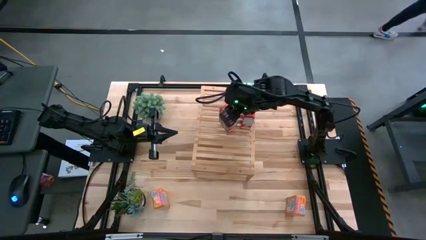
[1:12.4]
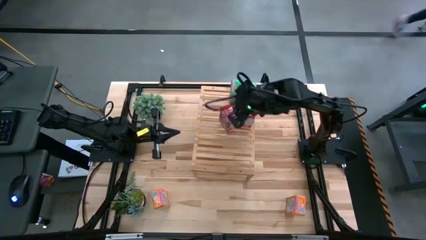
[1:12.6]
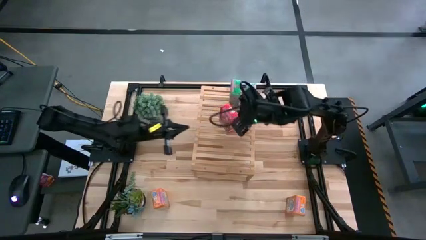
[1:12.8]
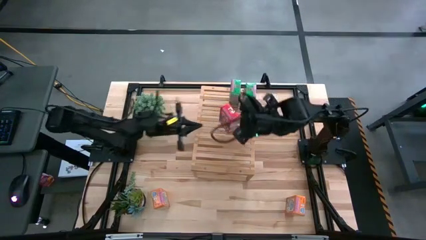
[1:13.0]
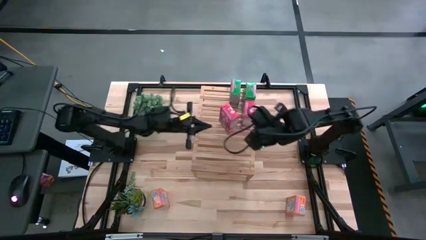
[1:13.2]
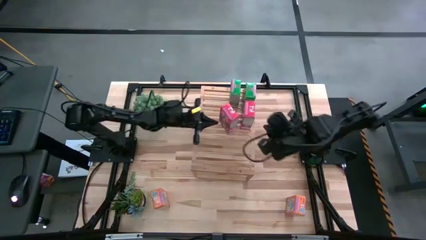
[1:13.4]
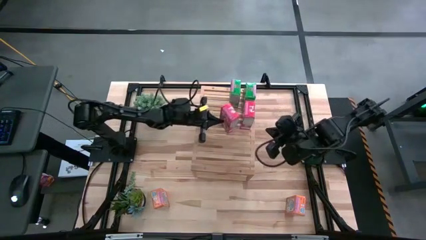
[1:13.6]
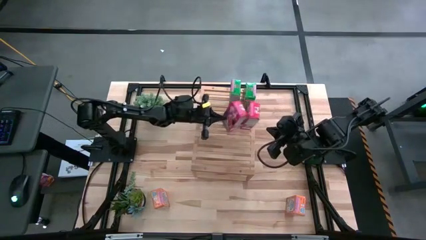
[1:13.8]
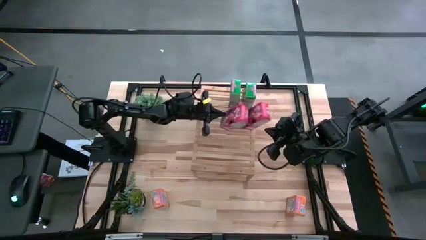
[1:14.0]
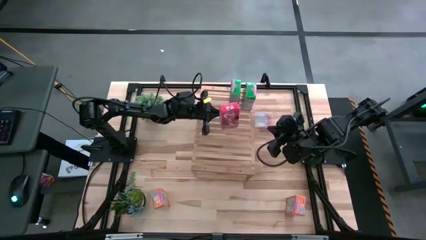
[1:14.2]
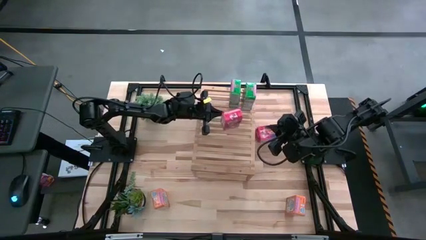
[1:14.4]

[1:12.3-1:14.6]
Task: Stack cereal on shelf
Adjust the red cereal box

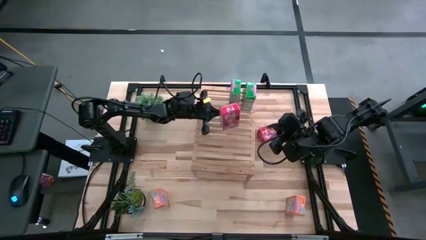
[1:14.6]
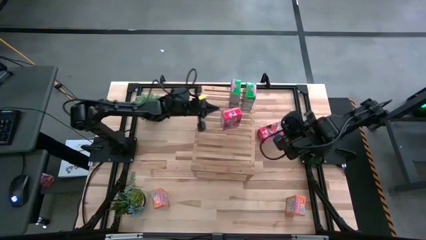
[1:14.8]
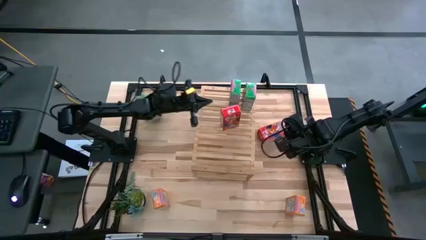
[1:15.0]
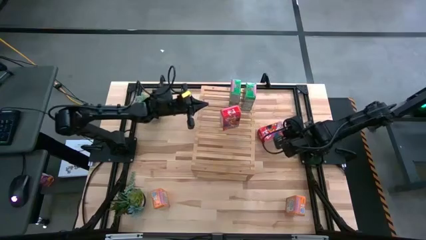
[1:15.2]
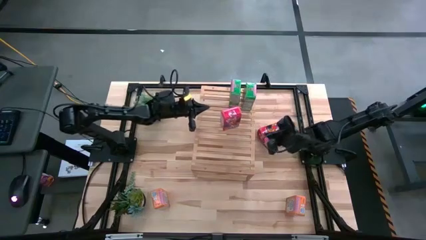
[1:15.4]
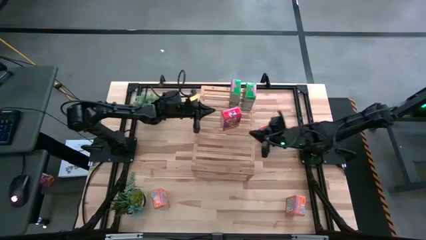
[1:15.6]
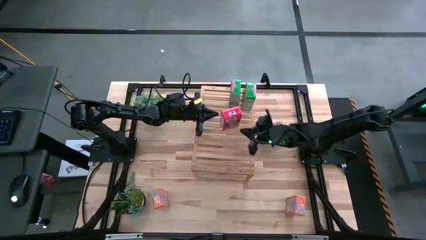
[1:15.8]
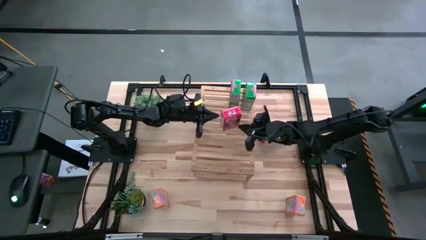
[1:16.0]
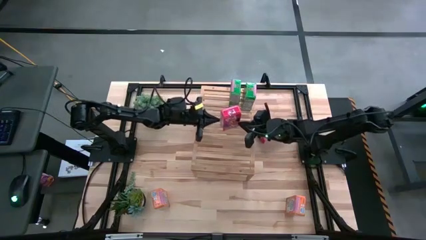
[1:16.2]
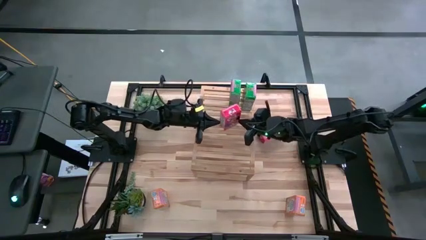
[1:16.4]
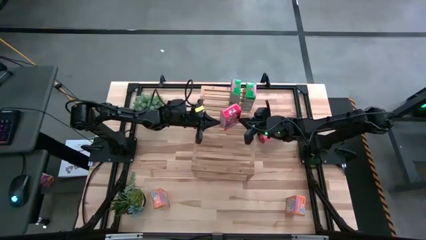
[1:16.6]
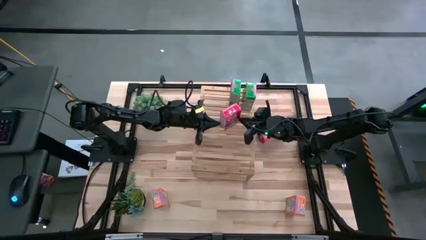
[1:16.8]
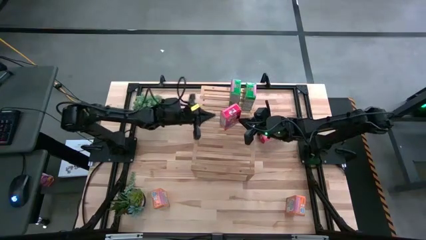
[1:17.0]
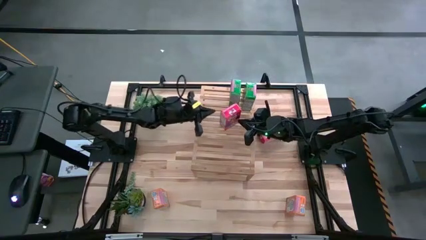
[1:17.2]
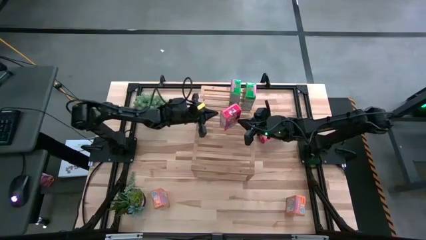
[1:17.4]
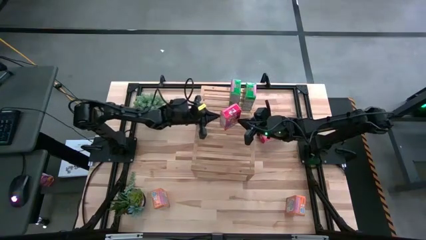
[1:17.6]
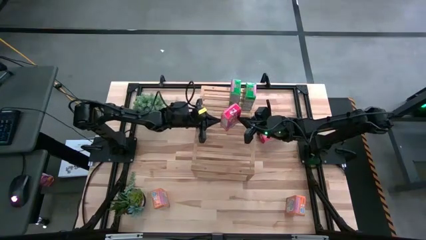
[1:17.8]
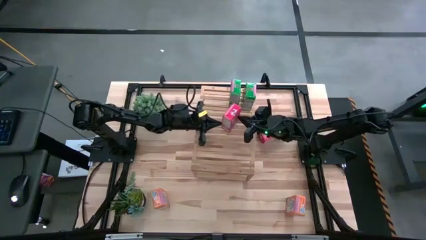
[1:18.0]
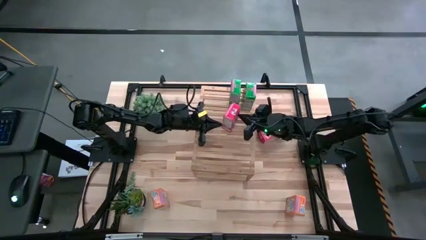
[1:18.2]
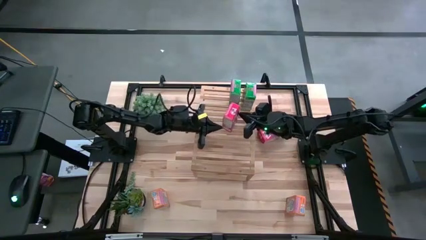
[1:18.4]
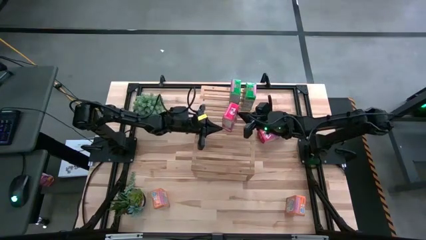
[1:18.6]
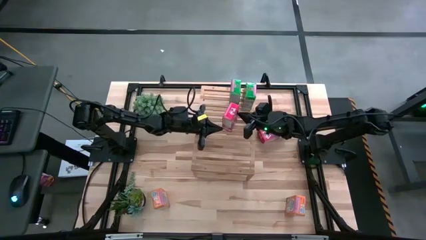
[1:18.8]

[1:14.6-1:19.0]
Adjust the red cereal box

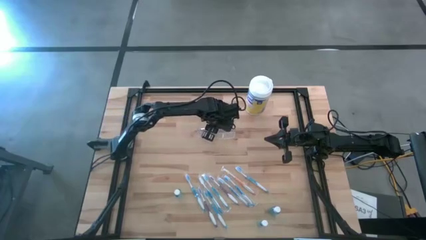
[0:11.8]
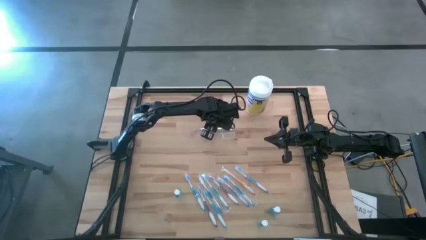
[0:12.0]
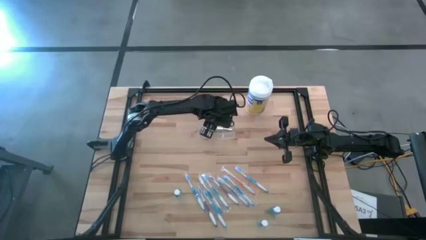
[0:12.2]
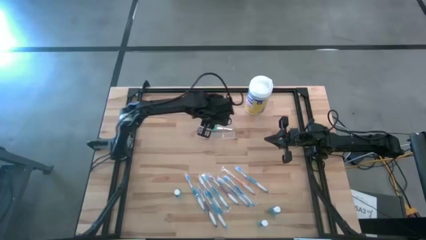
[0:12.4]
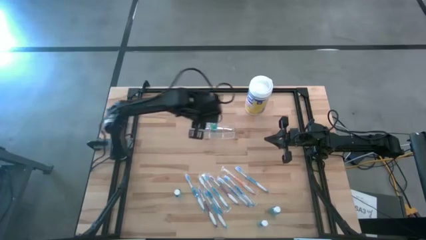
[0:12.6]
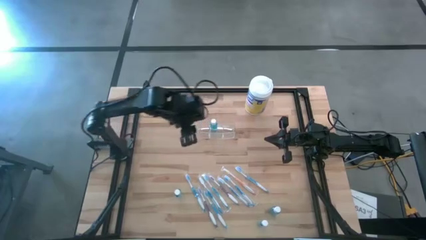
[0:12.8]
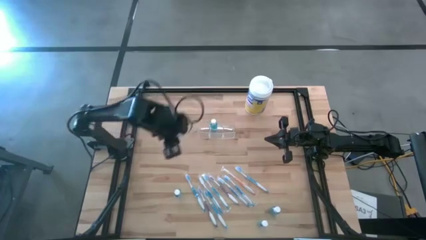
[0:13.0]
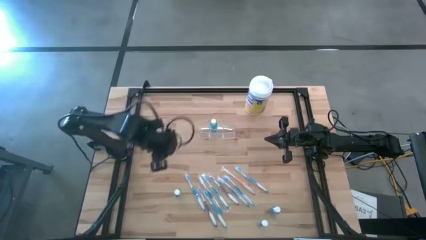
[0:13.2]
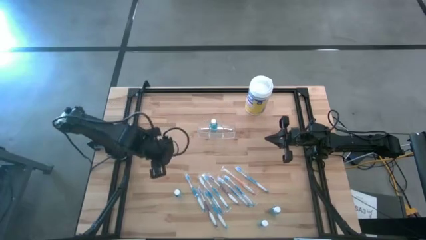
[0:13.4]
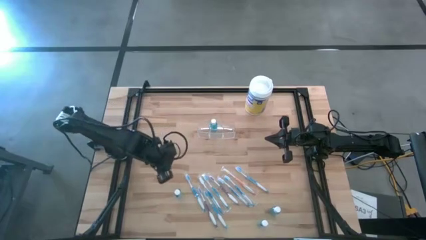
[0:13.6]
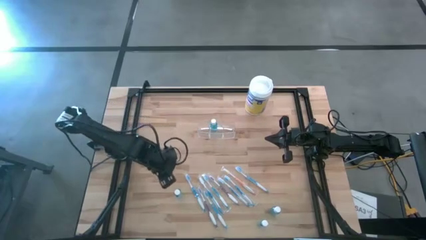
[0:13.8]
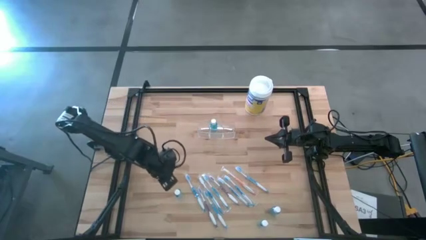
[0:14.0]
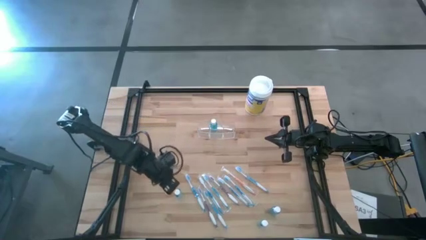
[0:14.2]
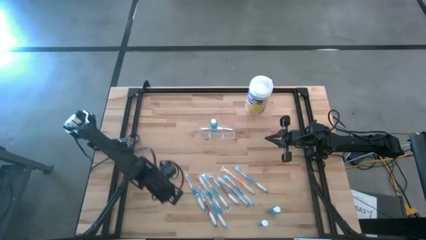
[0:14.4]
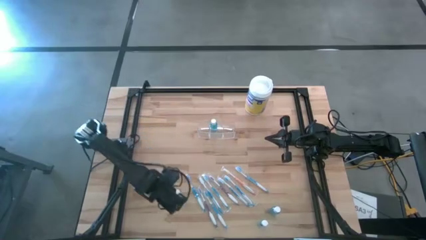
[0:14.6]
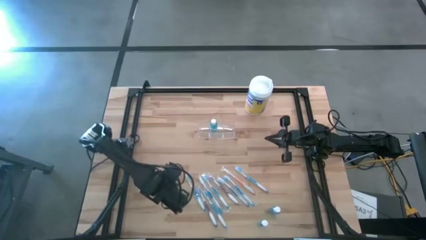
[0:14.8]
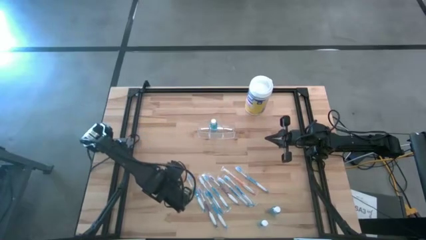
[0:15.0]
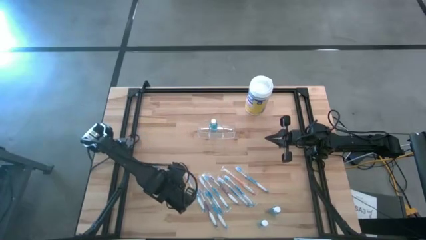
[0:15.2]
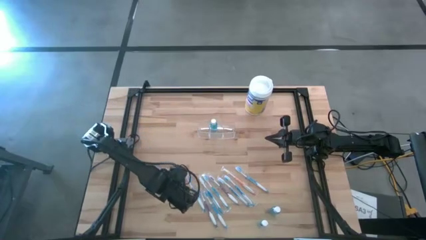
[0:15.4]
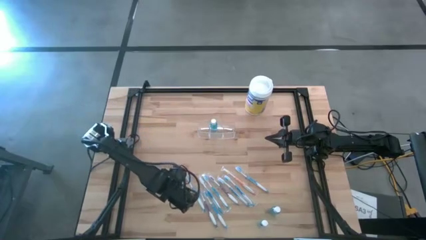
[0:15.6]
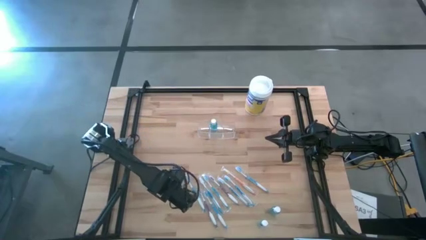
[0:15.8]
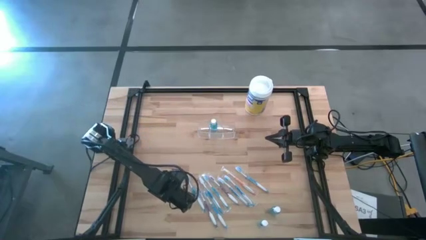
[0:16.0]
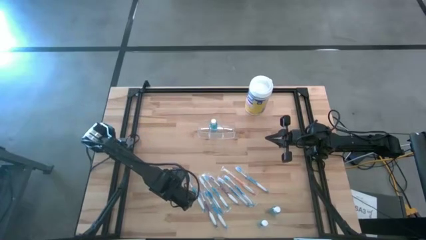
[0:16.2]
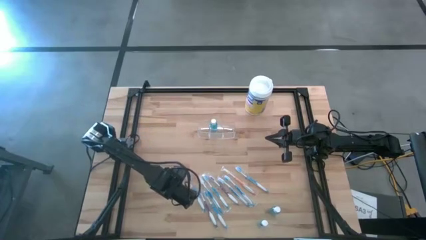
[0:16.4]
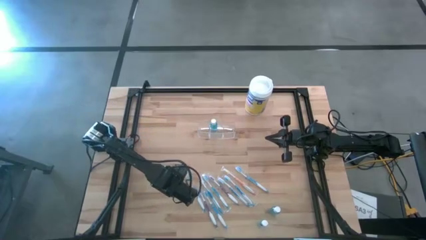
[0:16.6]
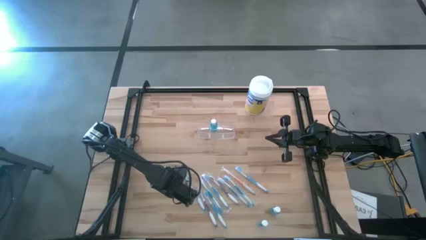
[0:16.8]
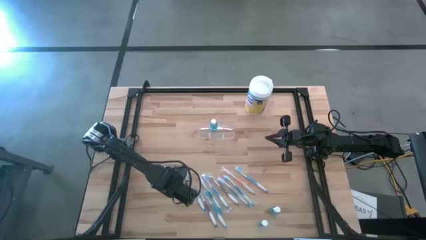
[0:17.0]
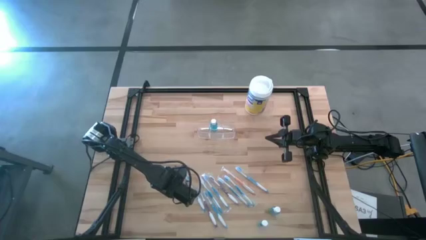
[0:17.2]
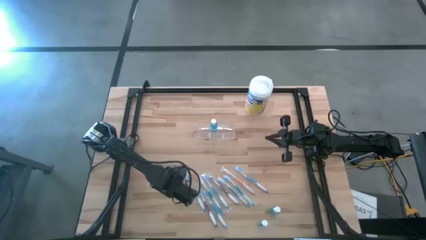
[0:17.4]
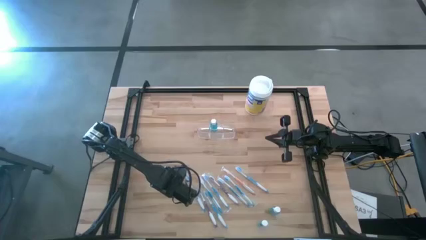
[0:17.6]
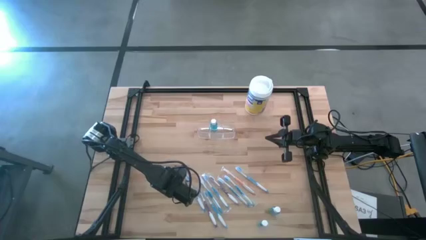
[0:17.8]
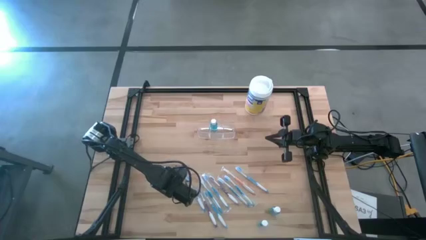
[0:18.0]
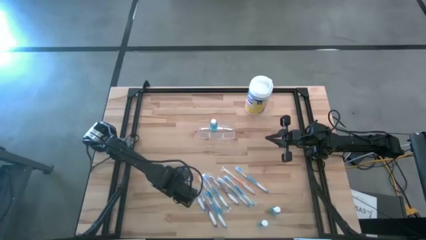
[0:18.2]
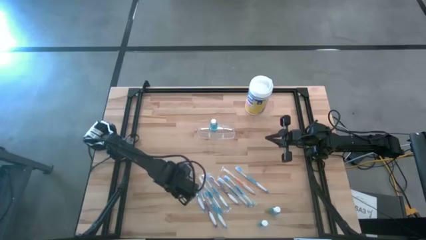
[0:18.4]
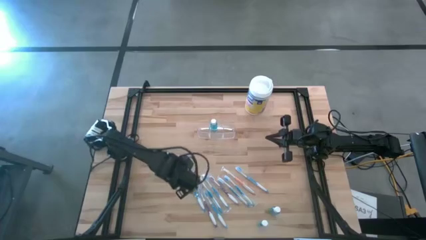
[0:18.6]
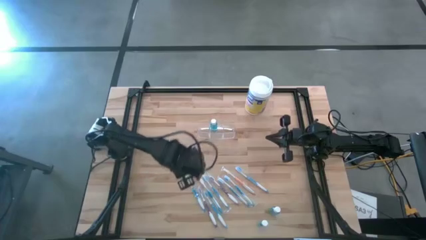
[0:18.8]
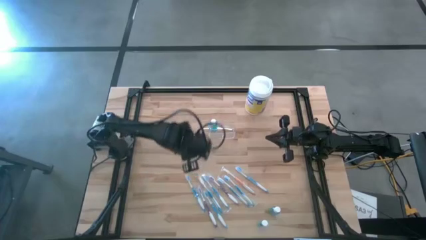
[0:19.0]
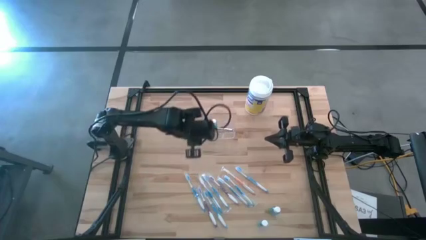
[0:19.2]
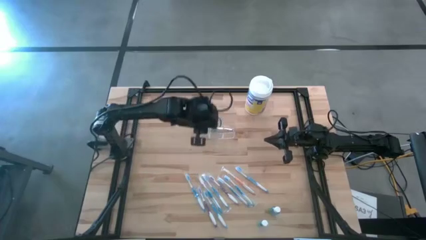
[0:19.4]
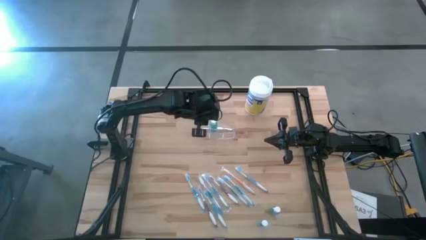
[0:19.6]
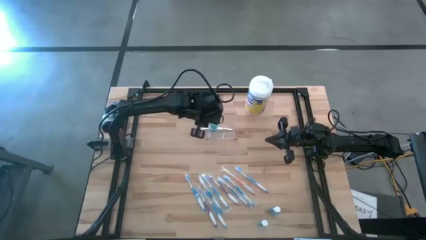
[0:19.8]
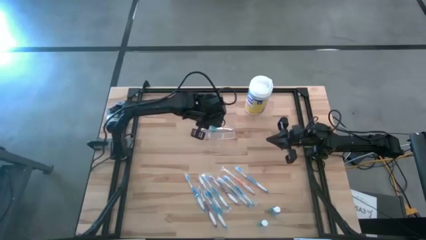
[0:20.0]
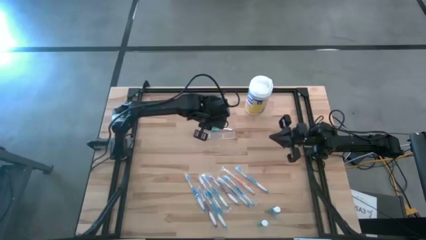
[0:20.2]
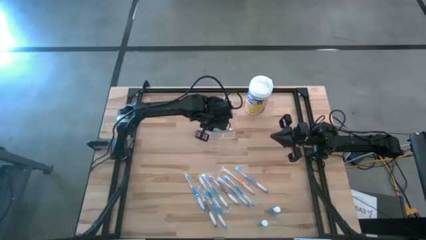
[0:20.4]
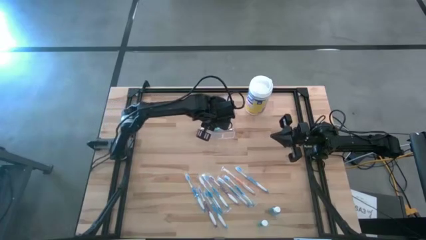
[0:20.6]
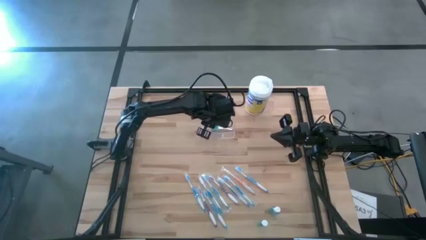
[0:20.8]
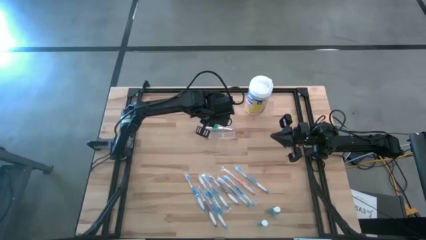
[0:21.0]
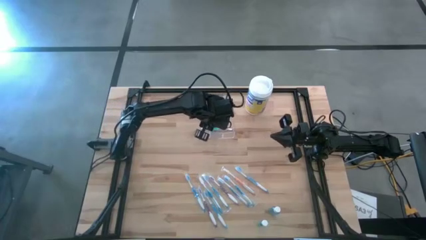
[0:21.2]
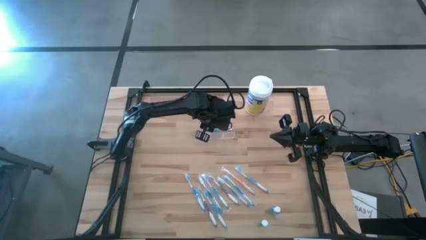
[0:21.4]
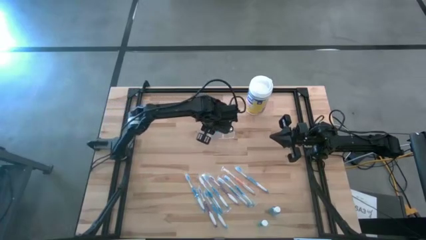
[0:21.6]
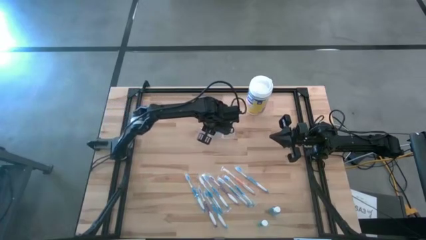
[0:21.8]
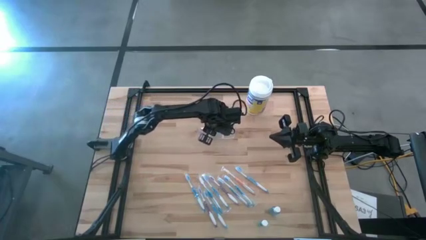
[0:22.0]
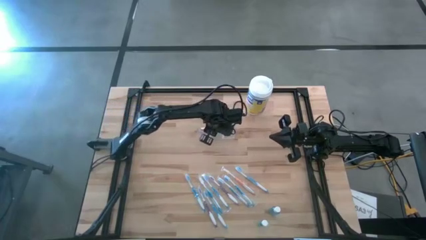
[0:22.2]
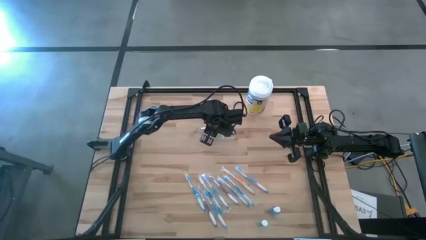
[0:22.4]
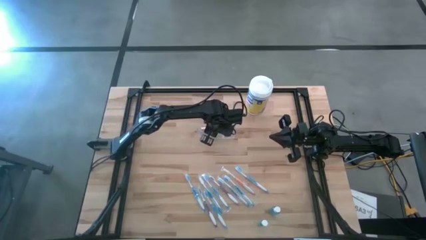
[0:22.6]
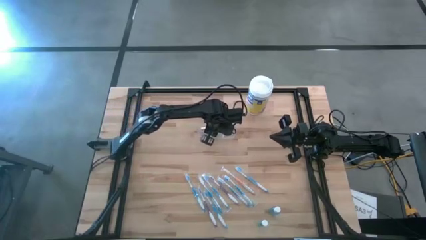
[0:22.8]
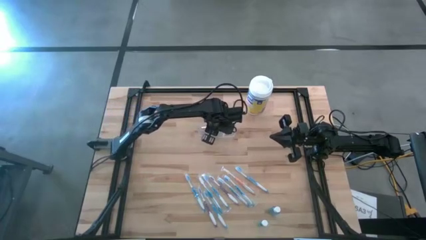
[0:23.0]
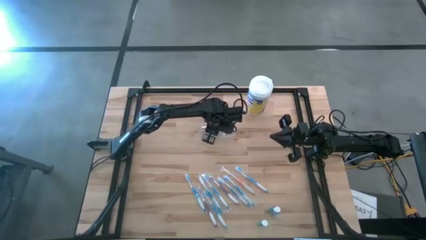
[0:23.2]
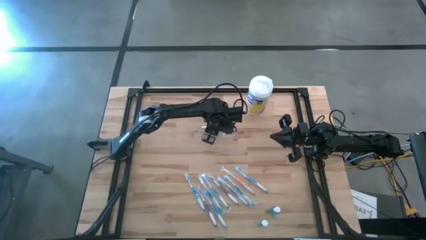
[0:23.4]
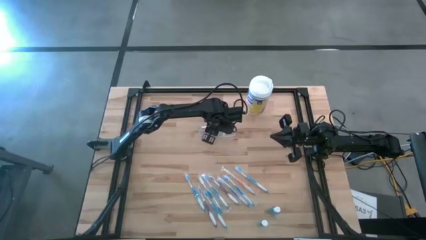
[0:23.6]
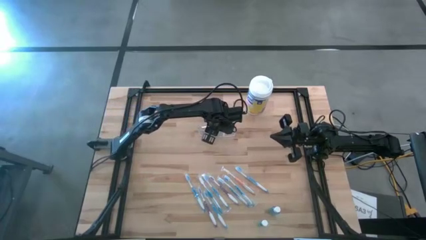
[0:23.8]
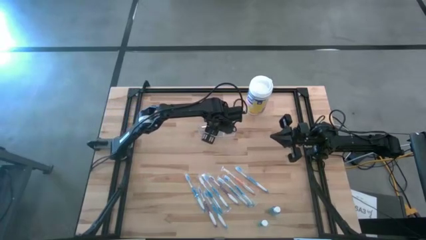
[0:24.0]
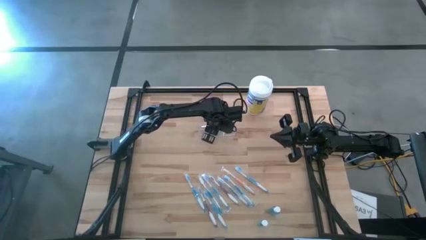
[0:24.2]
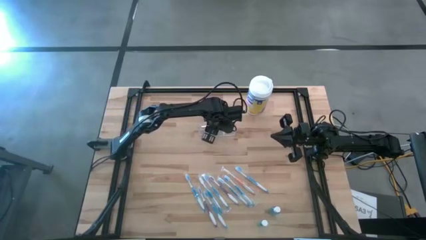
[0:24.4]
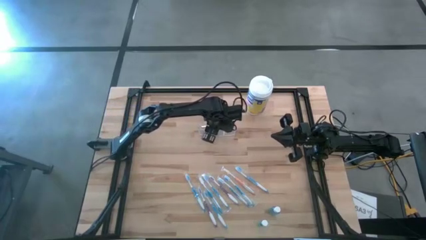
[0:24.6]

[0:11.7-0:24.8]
Task: Pick & Place toothbrushing station
Put the top right blue mouthwash into the transparent organizer
